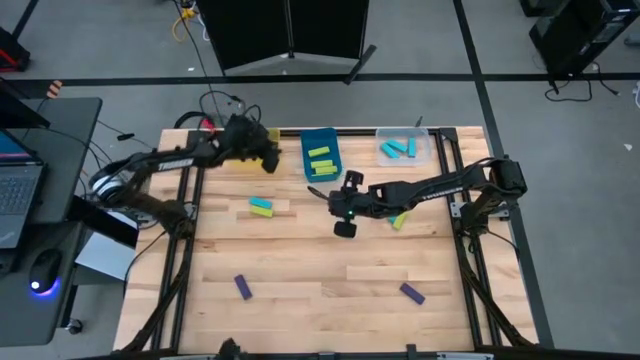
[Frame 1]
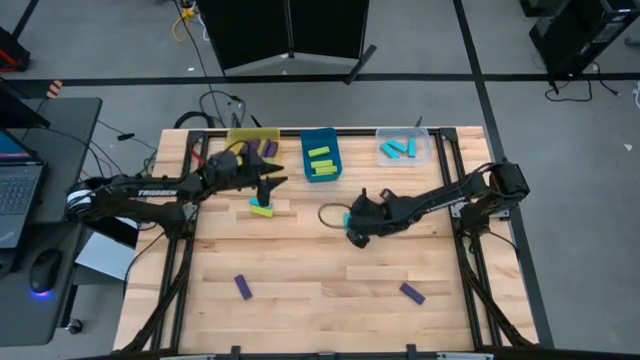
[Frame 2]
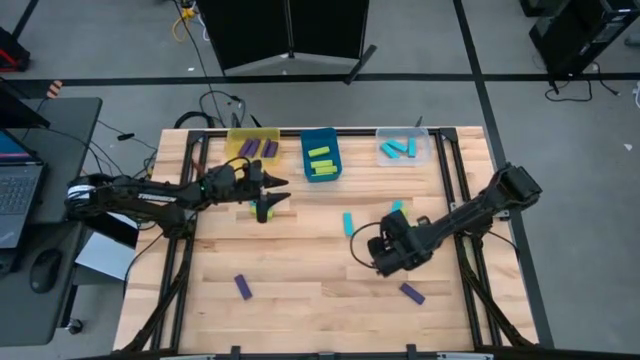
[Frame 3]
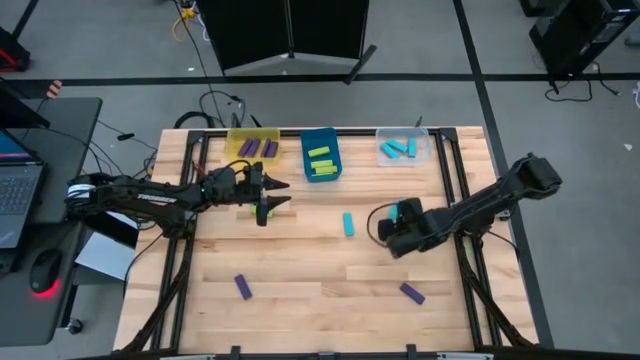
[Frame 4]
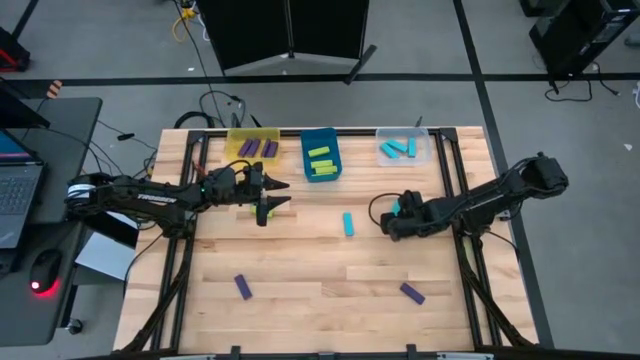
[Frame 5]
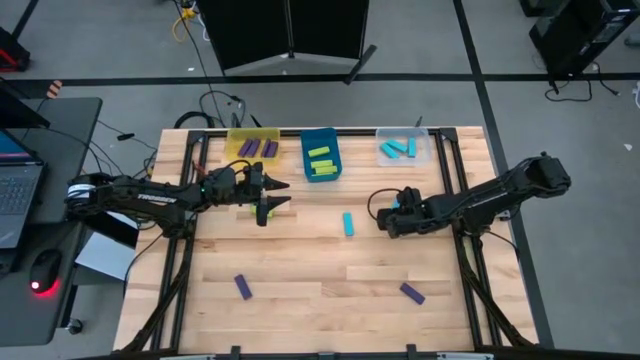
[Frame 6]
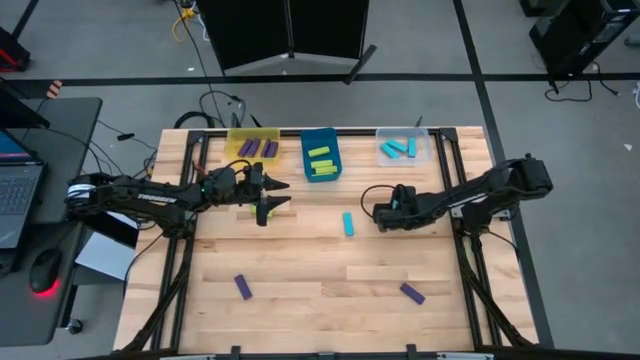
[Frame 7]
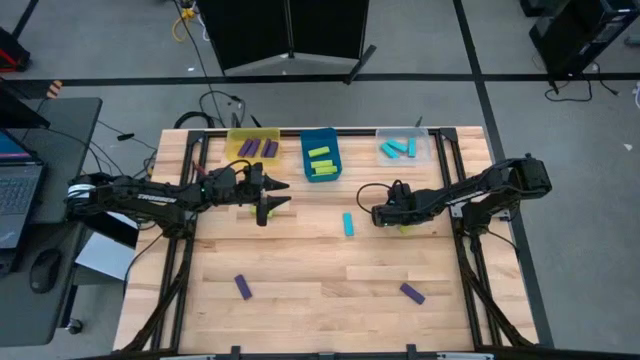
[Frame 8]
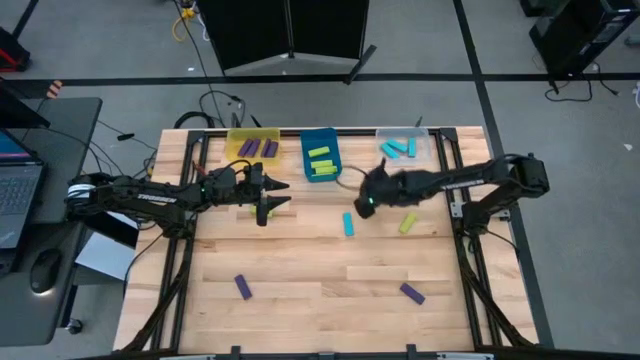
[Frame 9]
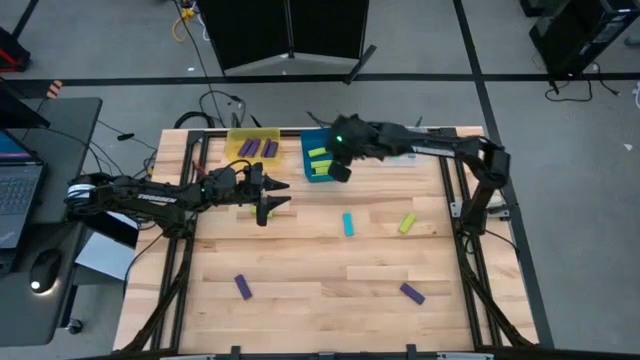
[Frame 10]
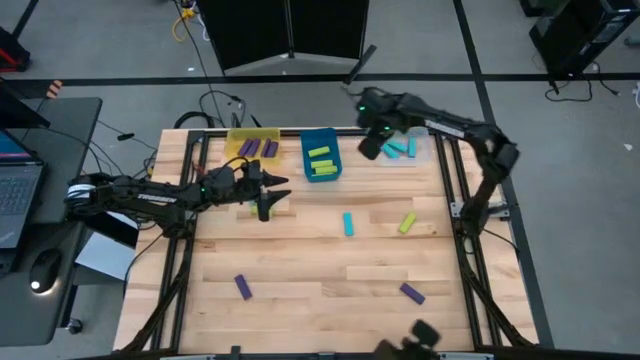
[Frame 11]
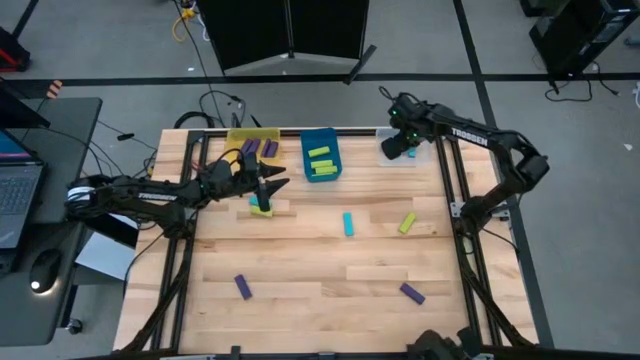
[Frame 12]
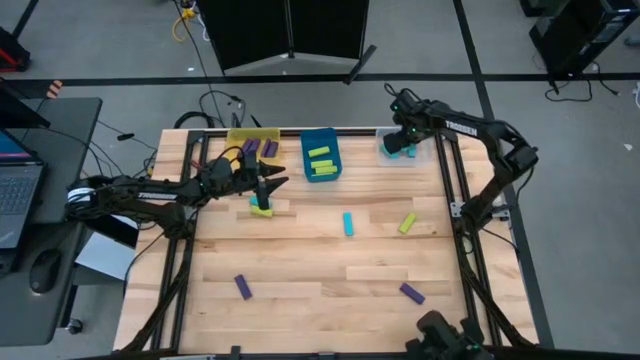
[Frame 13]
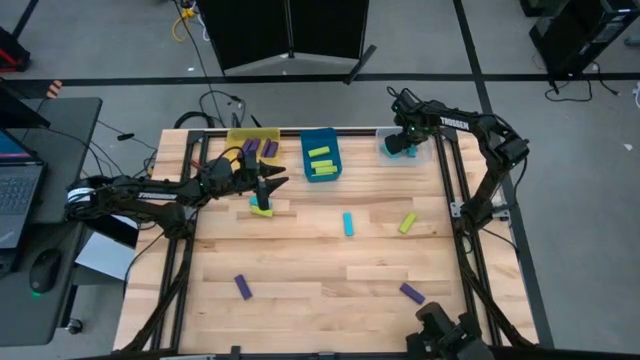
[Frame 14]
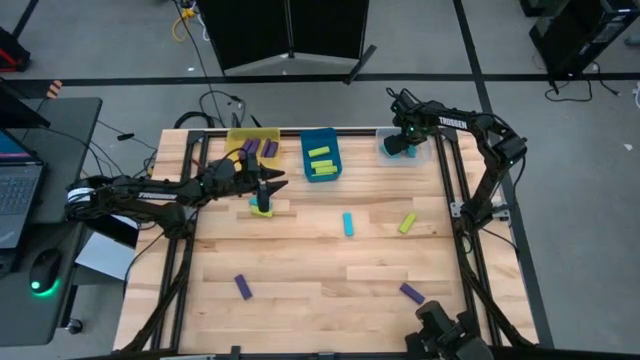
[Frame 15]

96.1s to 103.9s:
Task: Sort blocks
Put the blue block into the transparent bin

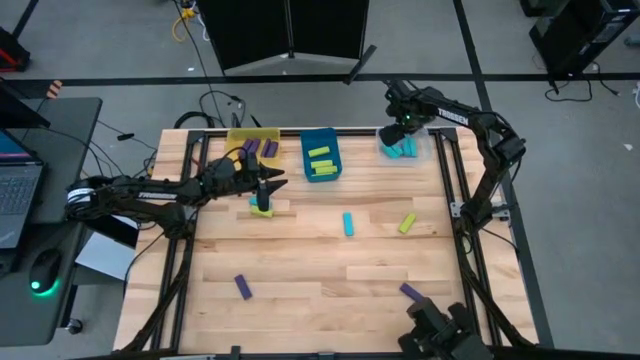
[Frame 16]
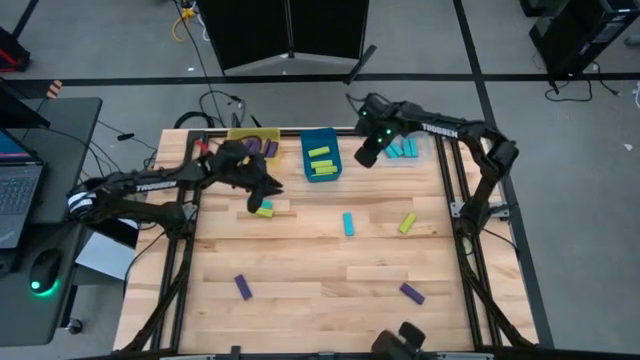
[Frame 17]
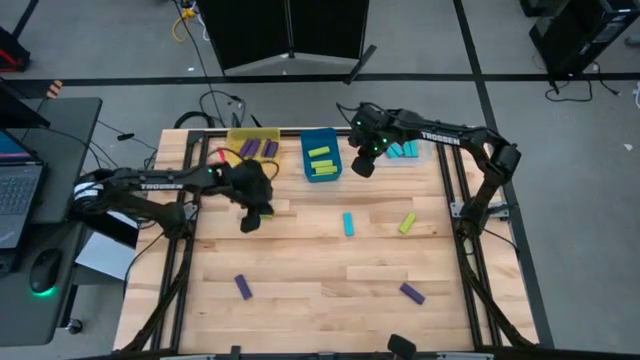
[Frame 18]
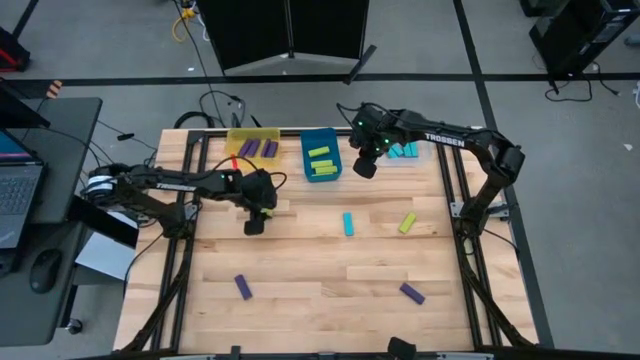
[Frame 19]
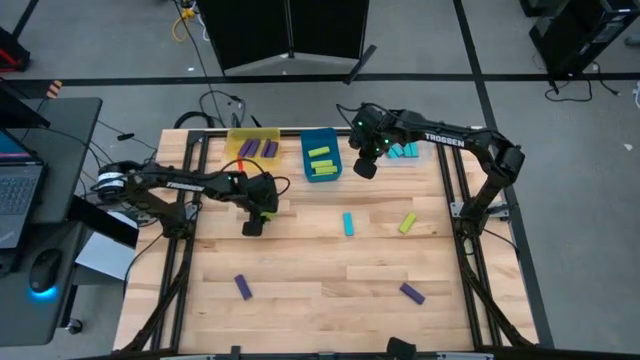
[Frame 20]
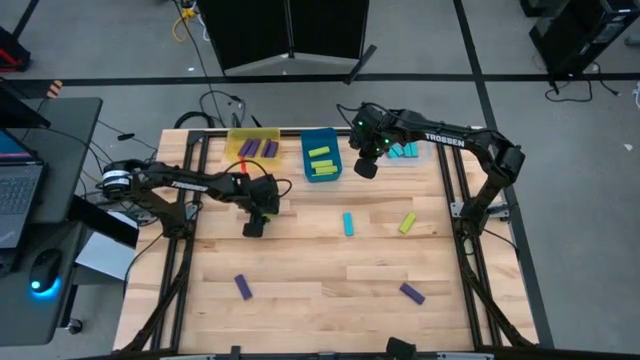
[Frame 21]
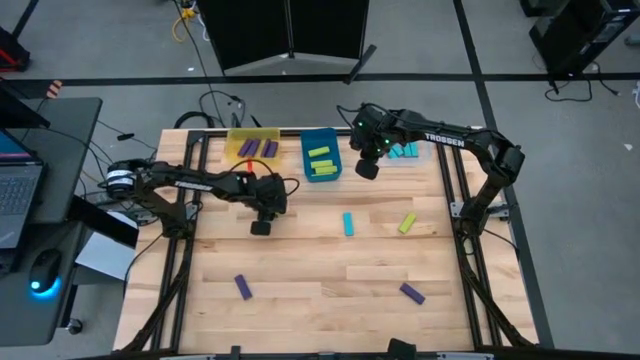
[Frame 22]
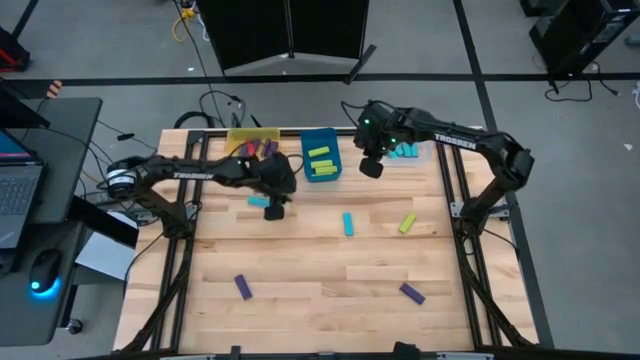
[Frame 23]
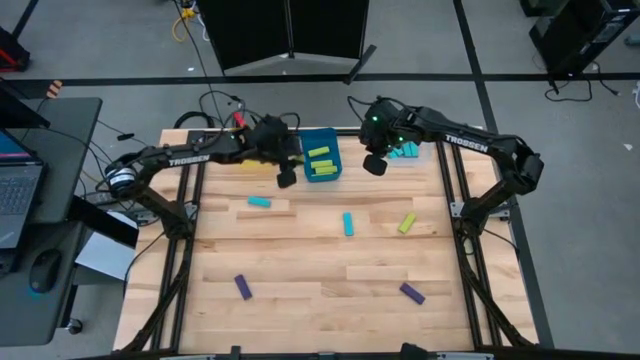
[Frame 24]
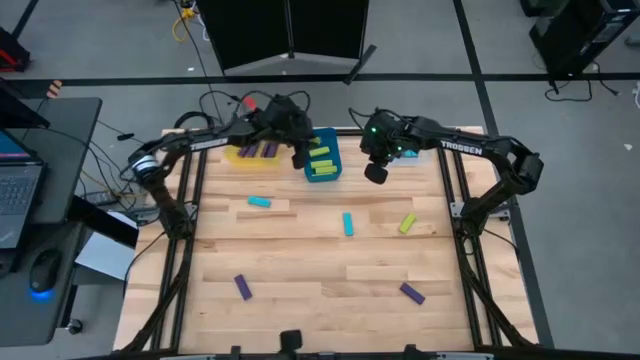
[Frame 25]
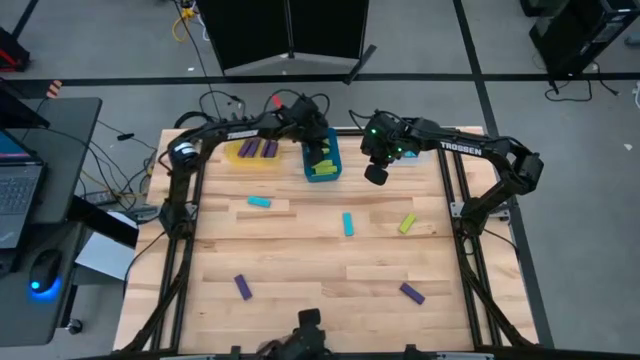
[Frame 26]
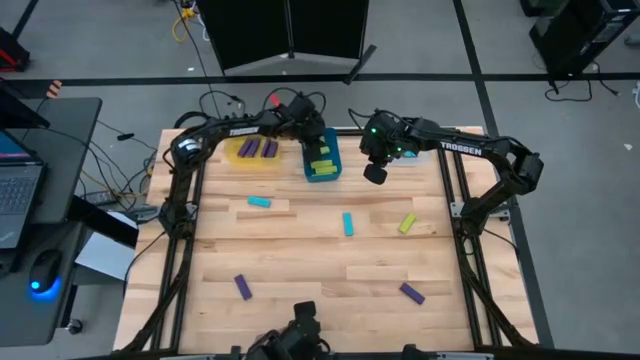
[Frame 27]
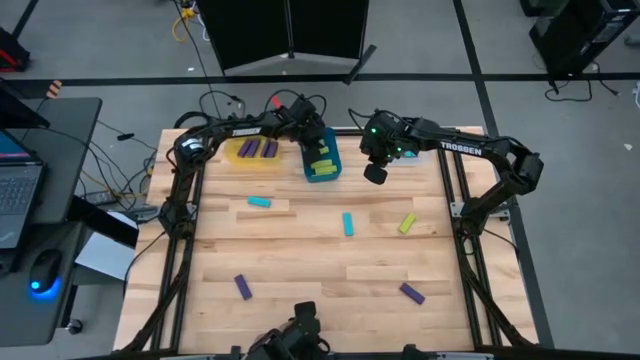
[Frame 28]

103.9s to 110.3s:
Put the green block into the blue bin
